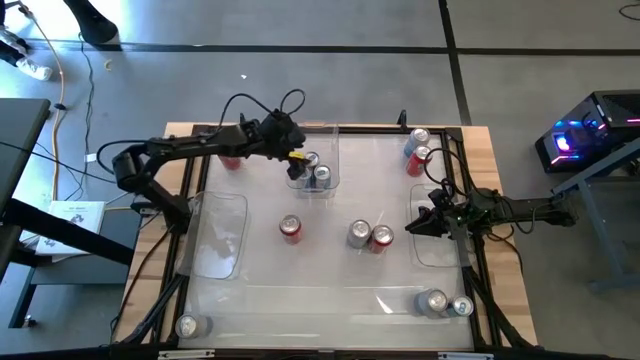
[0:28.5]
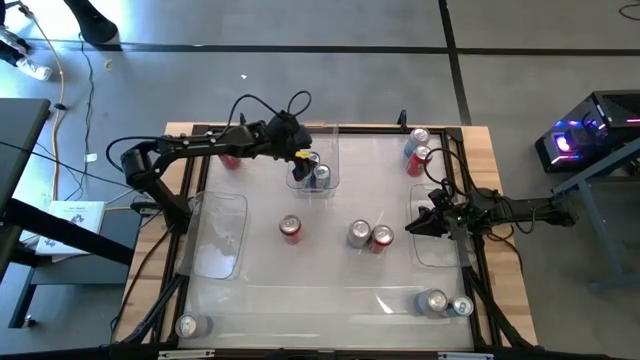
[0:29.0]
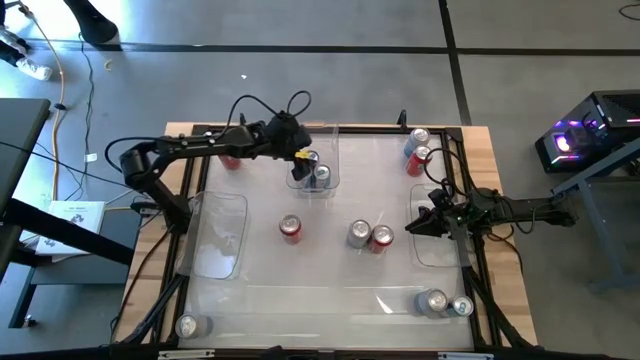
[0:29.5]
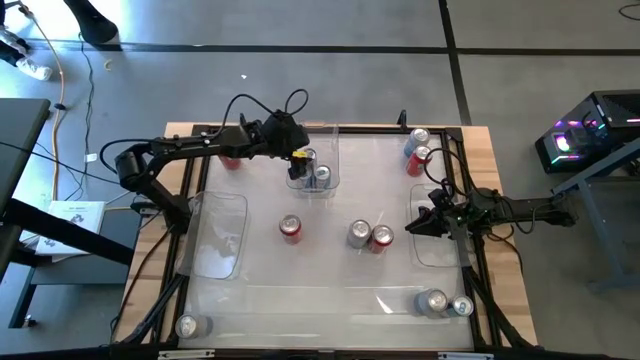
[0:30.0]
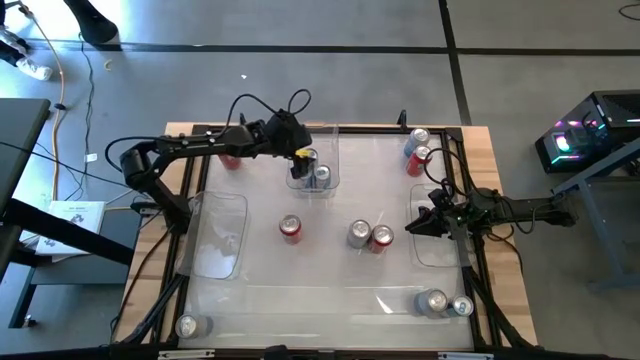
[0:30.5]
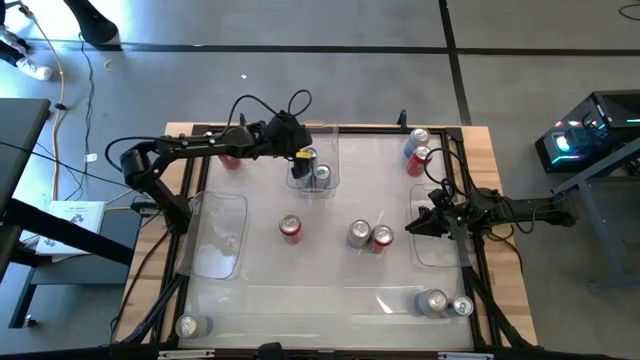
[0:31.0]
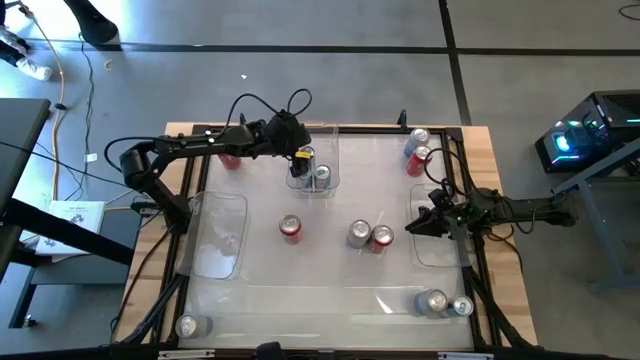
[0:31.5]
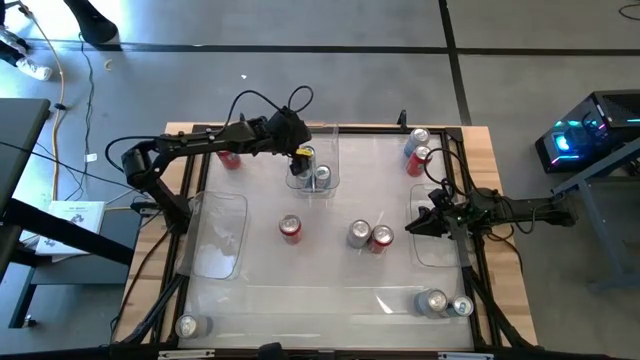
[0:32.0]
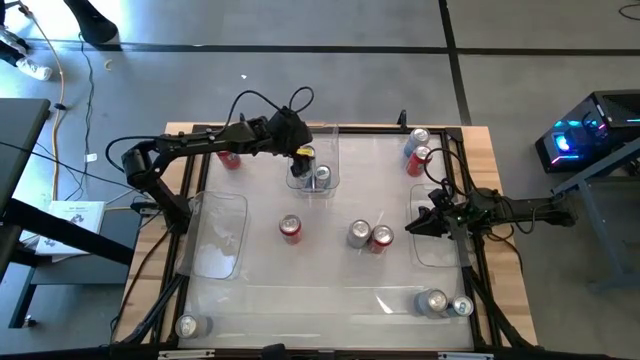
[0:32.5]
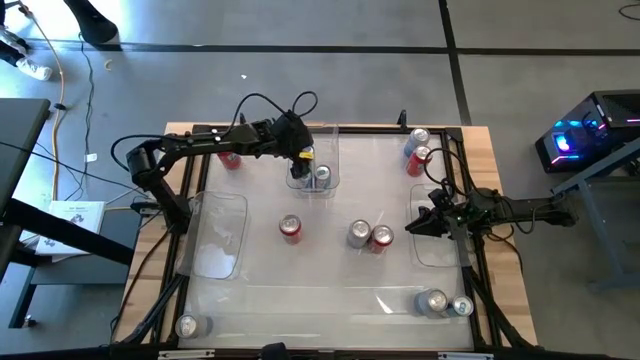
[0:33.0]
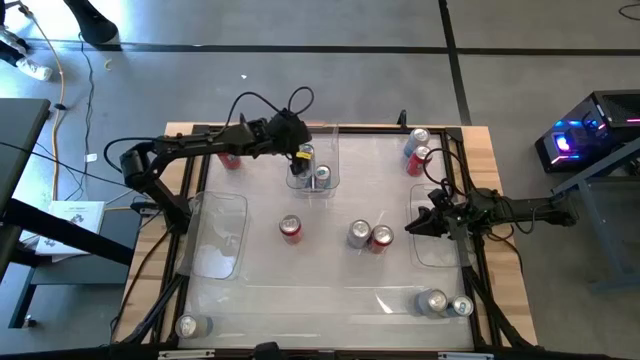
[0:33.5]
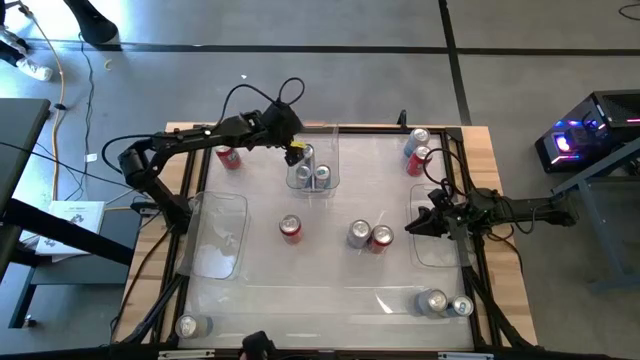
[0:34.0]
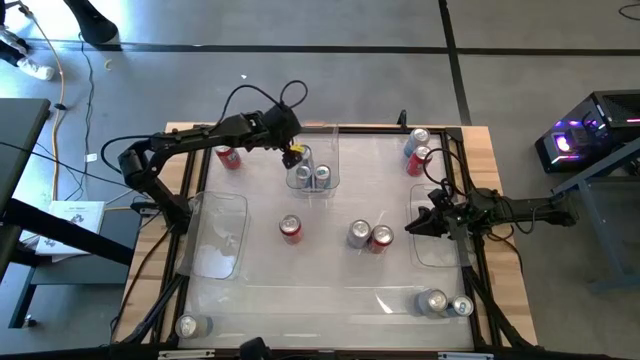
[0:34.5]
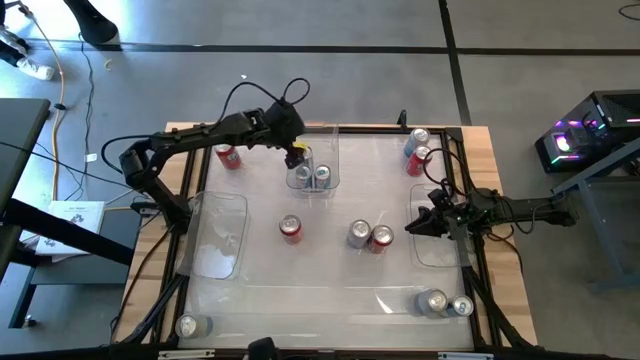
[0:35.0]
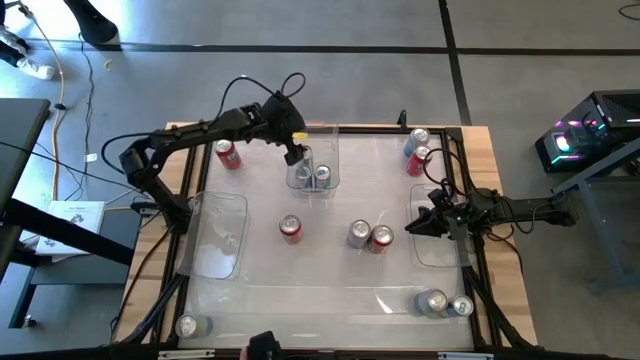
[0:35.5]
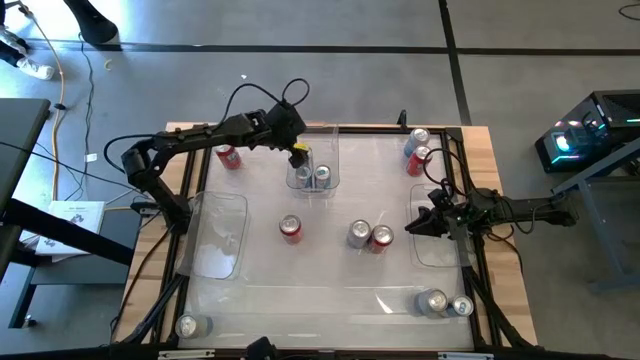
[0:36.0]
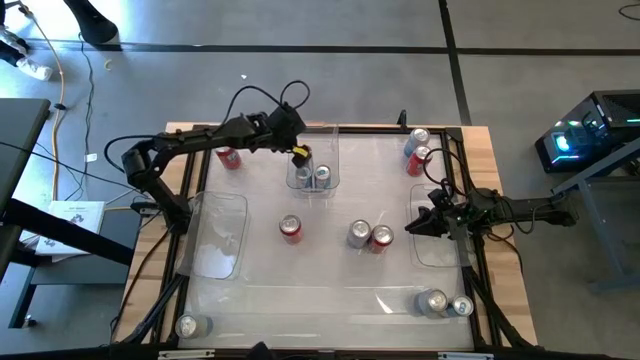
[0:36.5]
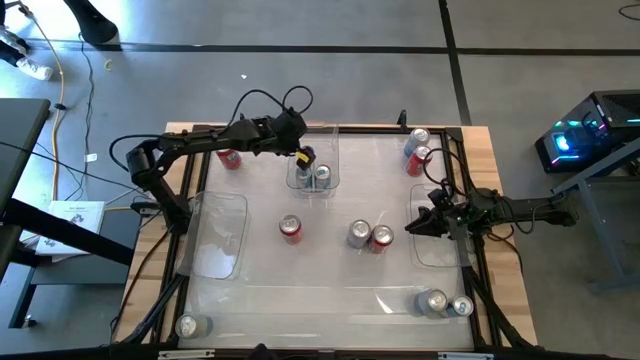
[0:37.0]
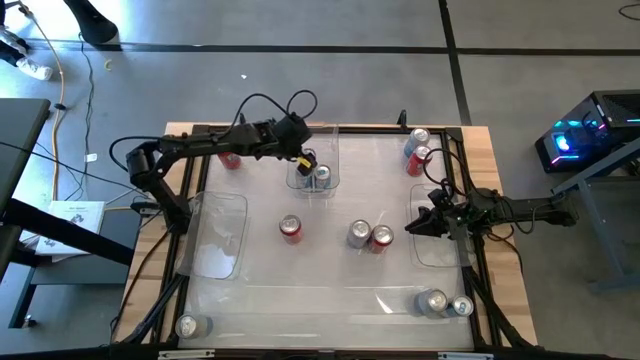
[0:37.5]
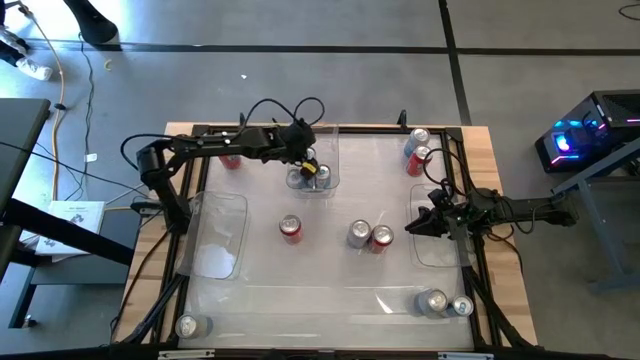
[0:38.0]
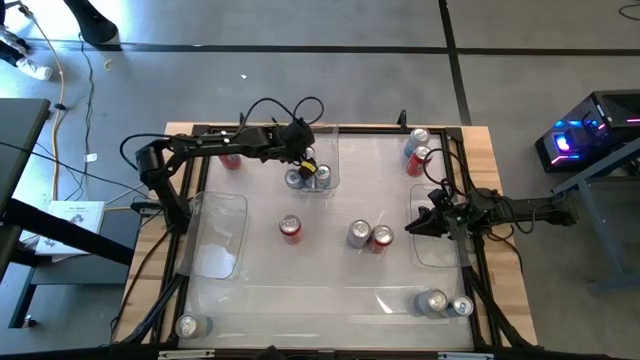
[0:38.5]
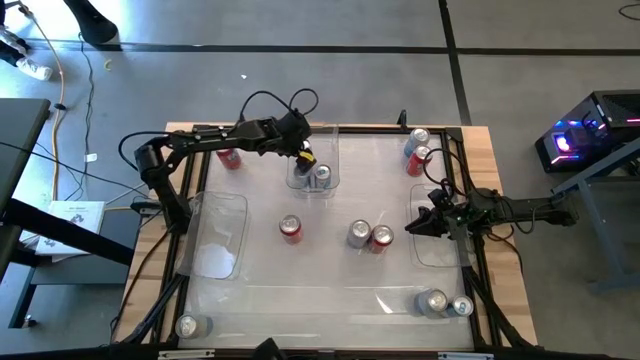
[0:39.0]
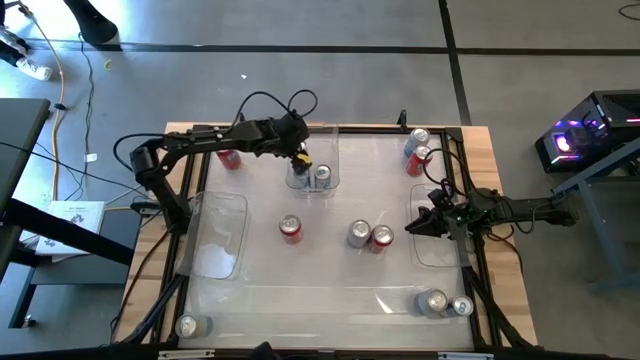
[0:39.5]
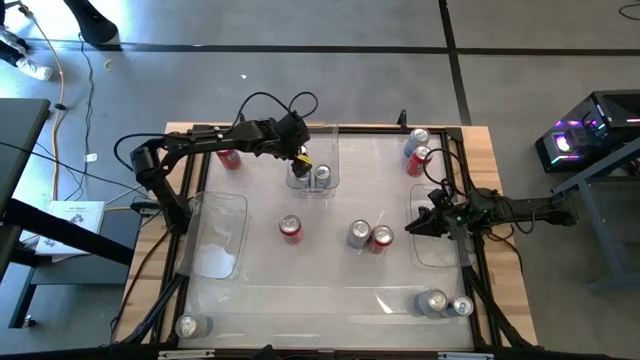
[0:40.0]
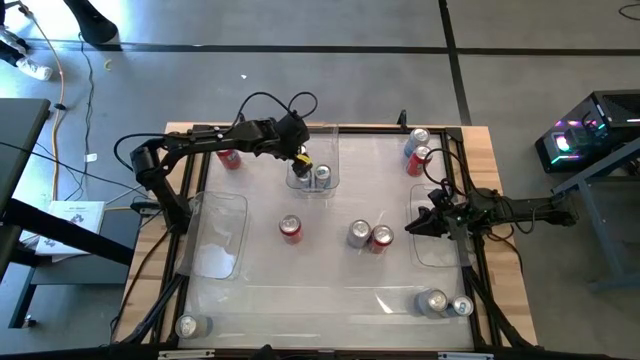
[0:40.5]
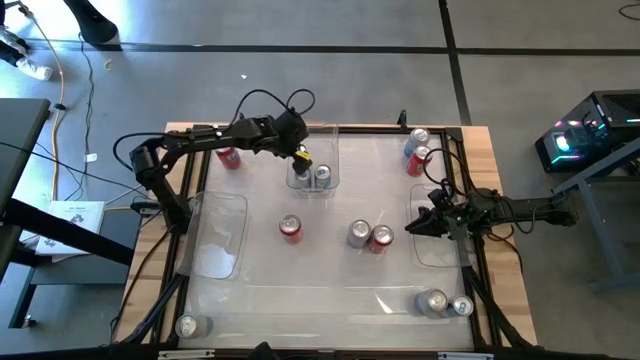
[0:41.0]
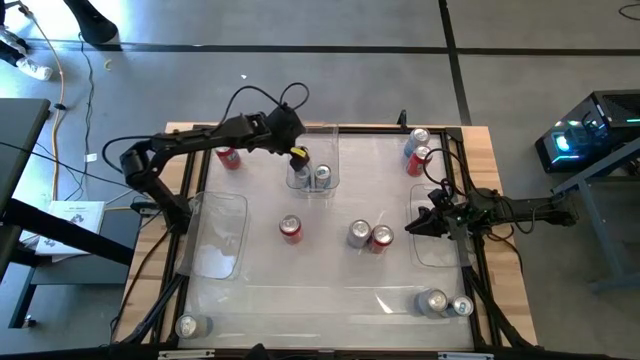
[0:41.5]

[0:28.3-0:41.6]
Task: Sort soda cans
Put the left blue soda can into the top center transparent bin

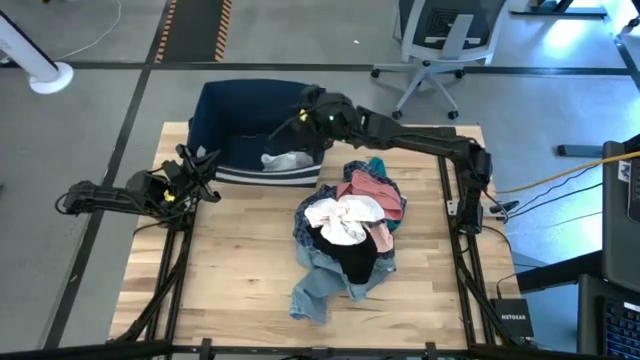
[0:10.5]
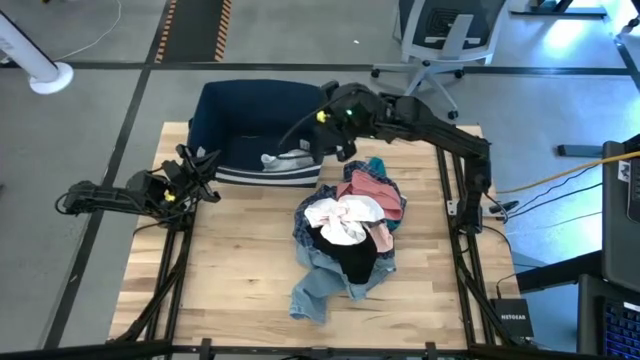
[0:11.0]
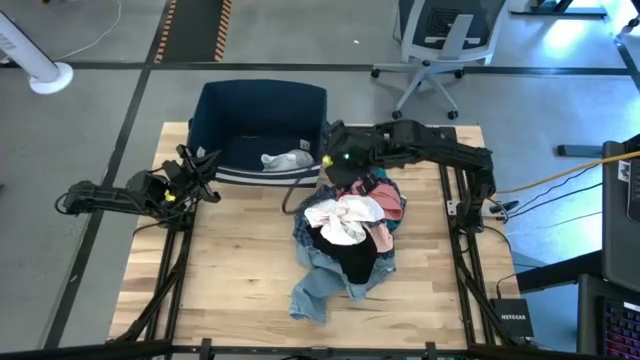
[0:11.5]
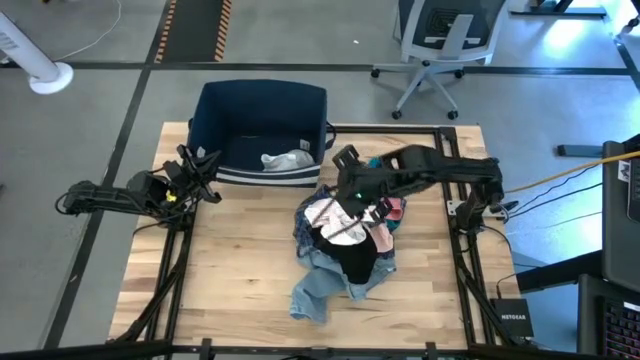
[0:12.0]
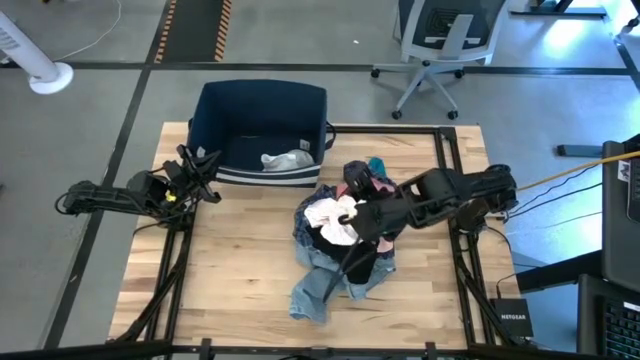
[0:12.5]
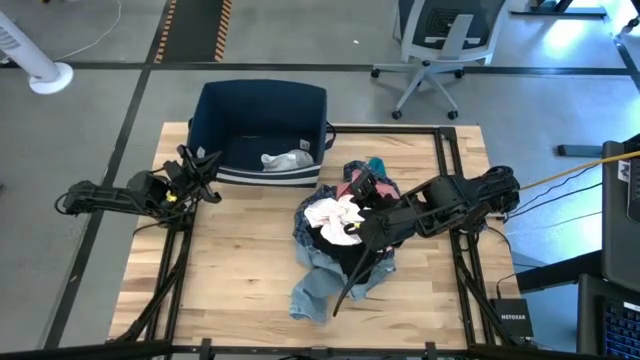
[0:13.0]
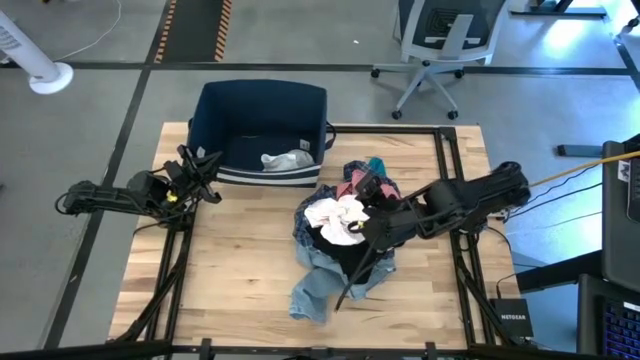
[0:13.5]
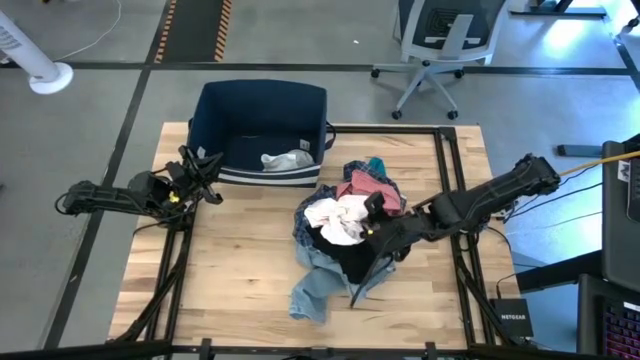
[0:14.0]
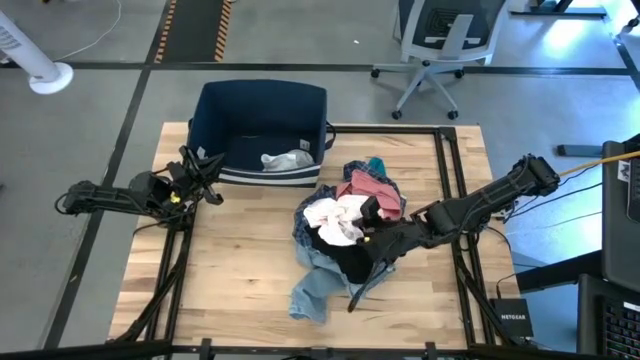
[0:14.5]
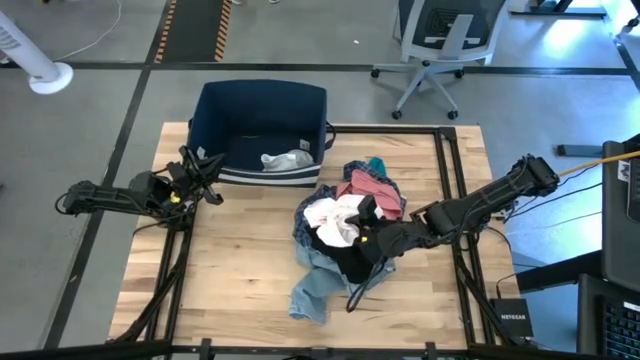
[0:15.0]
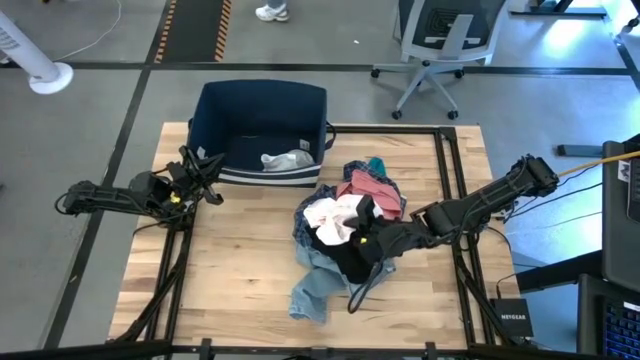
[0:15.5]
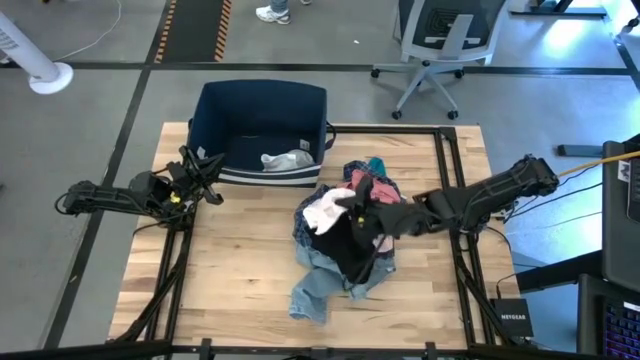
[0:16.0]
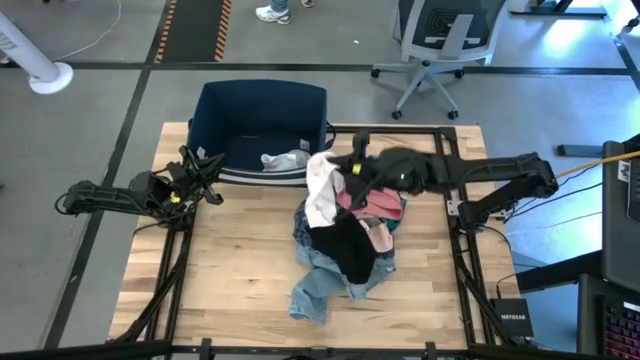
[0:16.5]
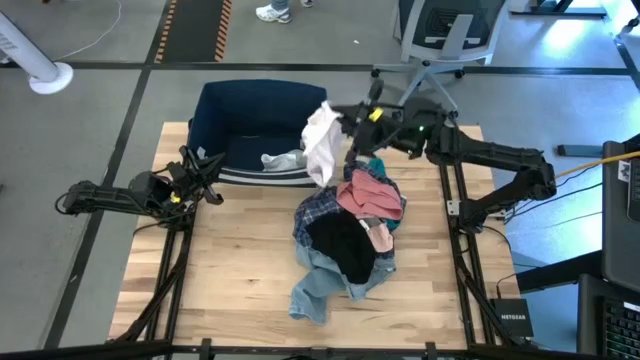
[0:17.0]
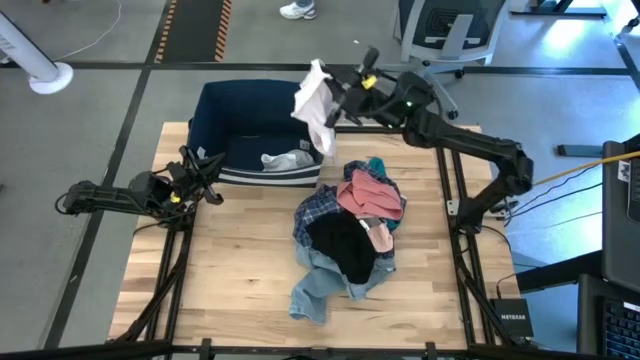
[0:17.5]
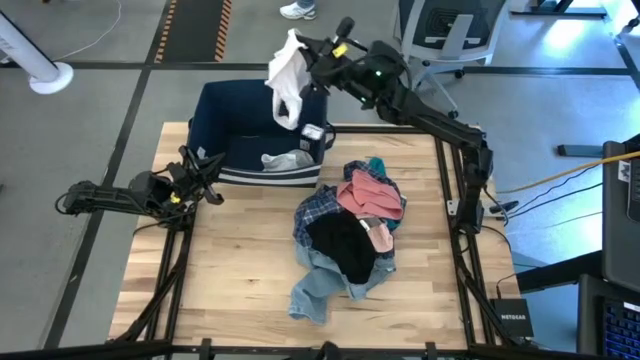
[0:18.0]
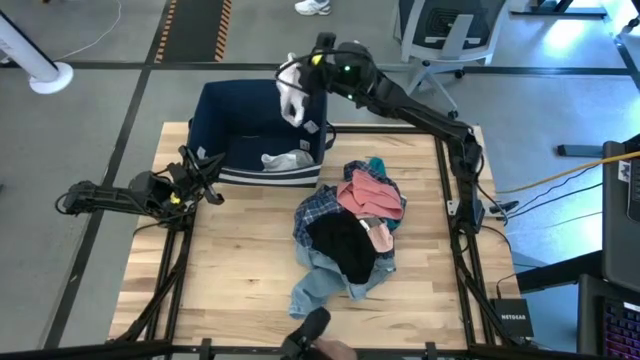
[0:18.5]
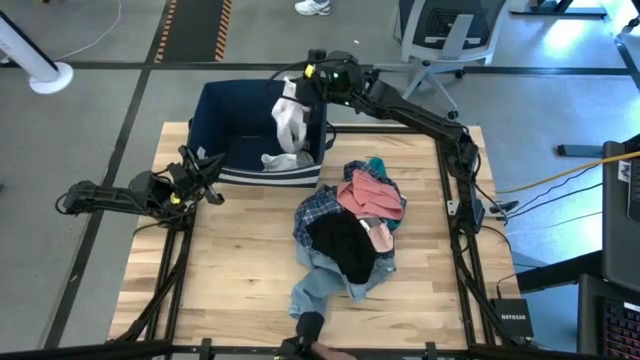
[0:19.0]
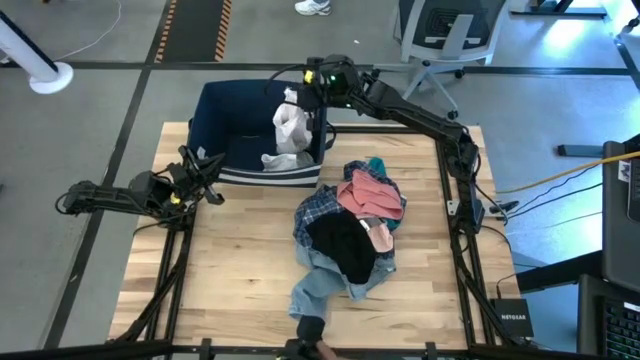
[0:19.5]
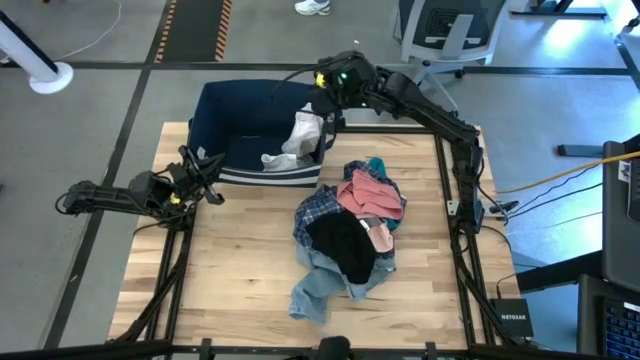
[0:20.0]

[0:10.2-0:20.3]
Task: Sort clothes
Put the white underwear into the blue laundry bin
